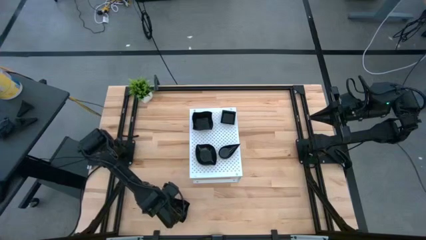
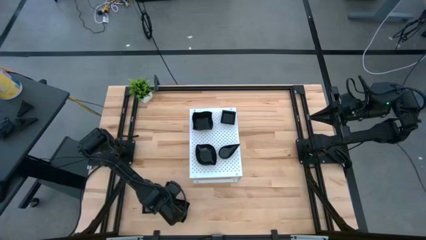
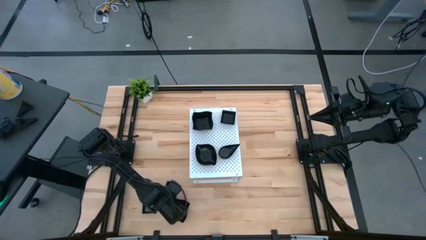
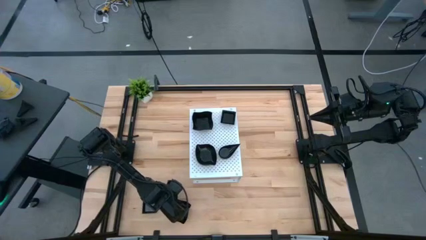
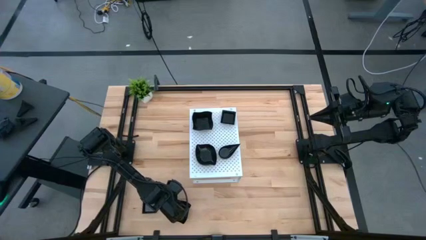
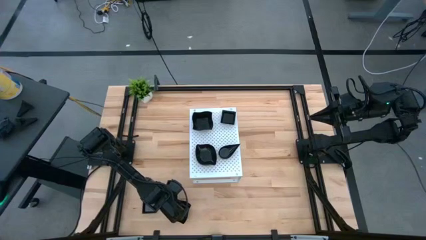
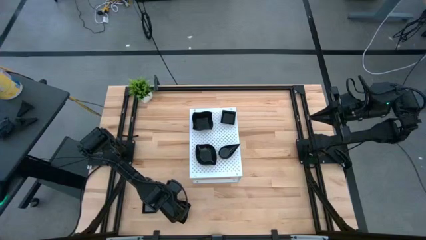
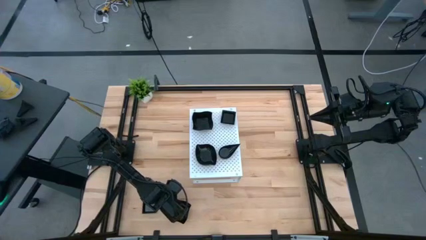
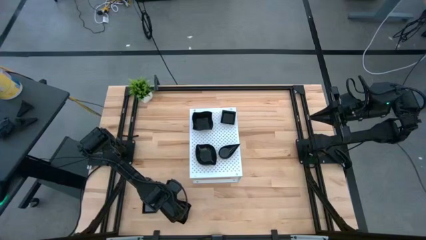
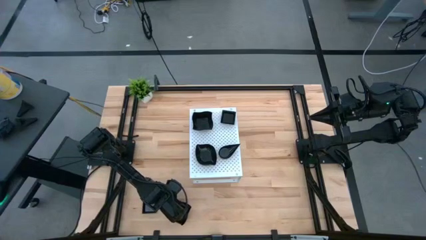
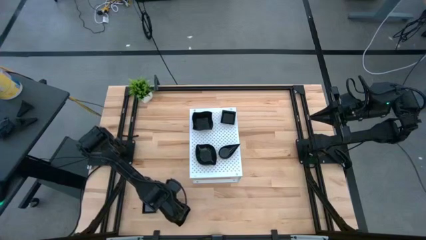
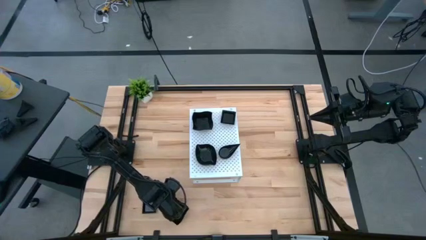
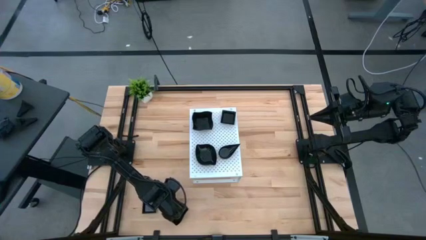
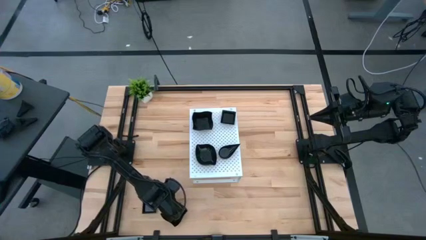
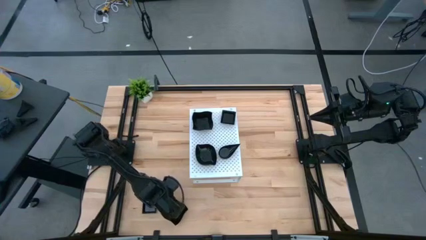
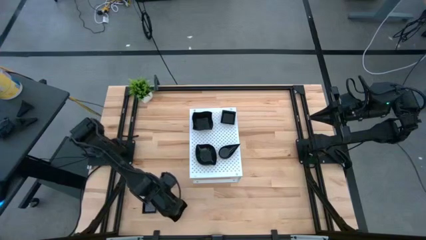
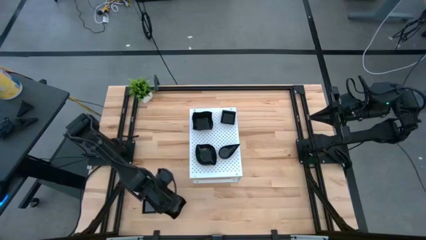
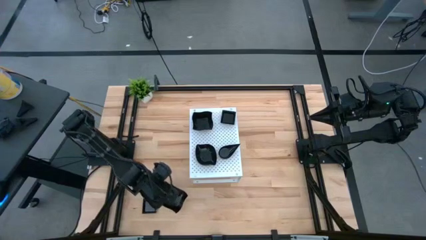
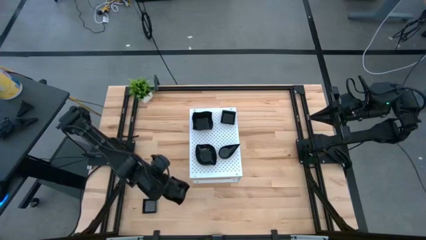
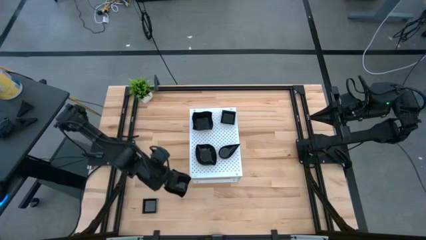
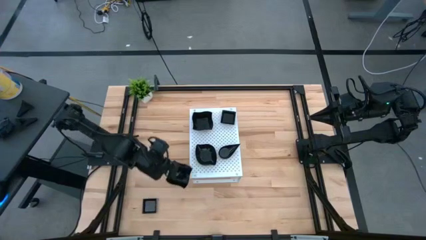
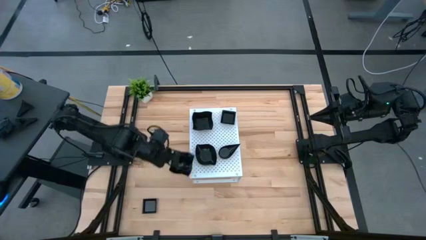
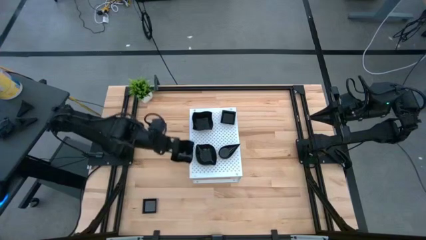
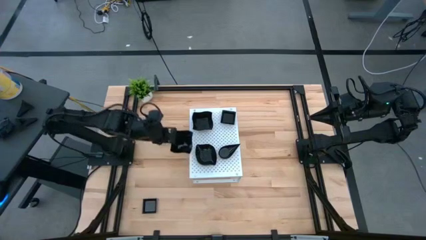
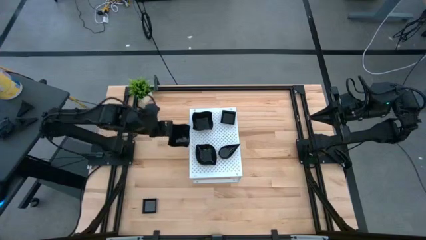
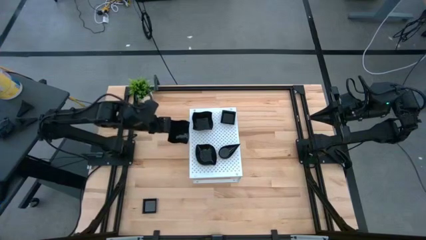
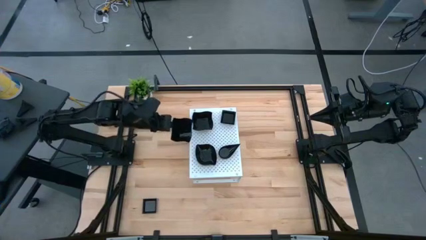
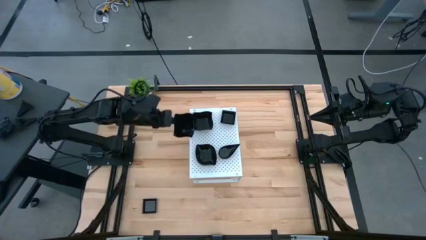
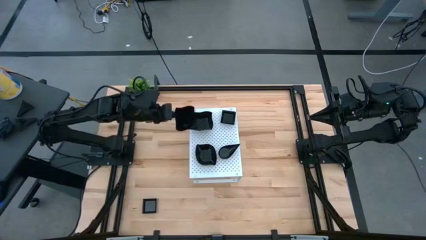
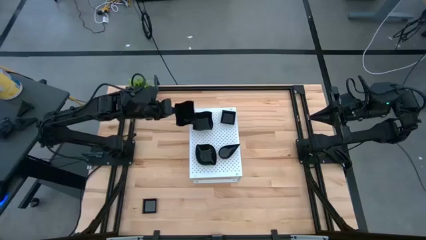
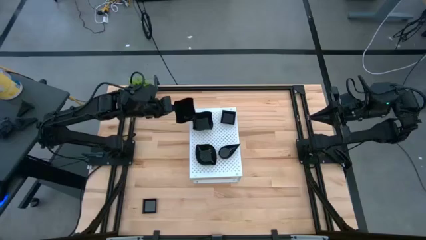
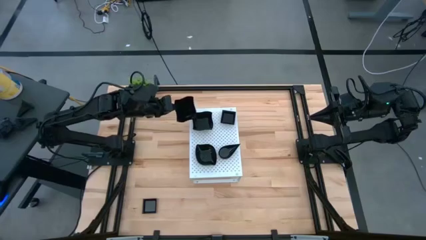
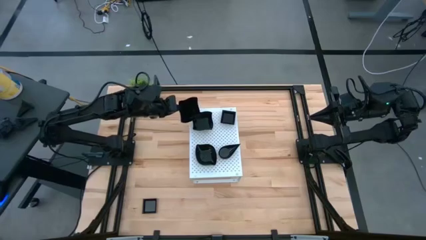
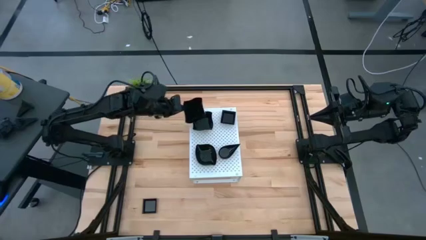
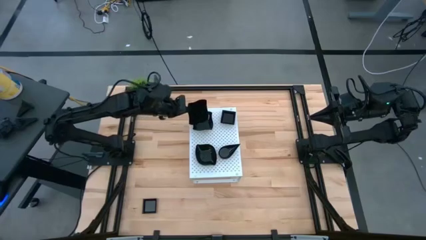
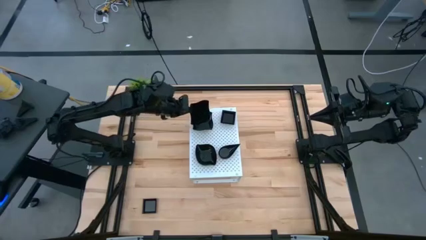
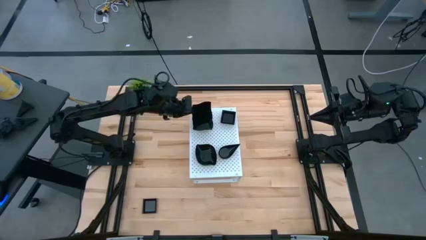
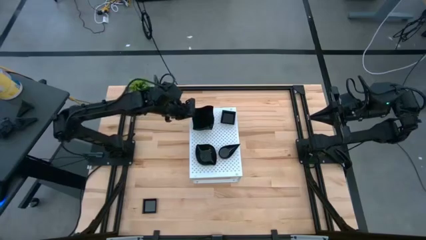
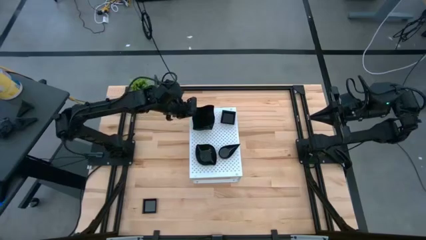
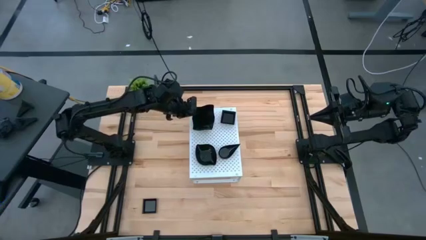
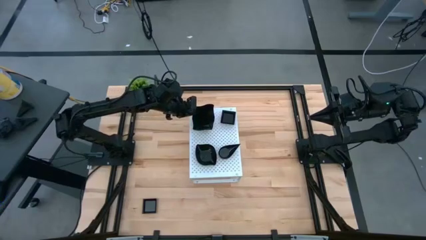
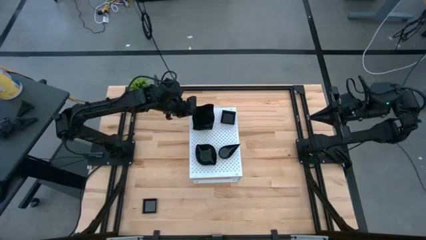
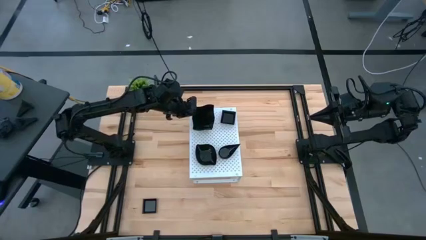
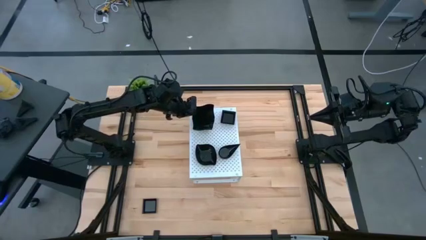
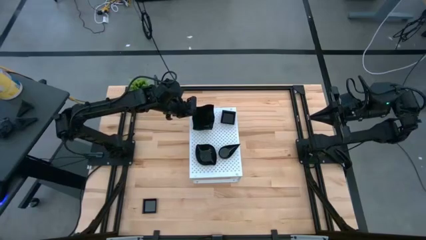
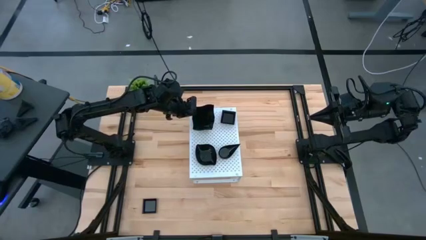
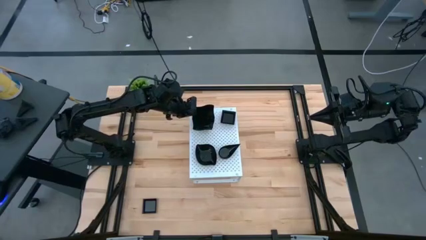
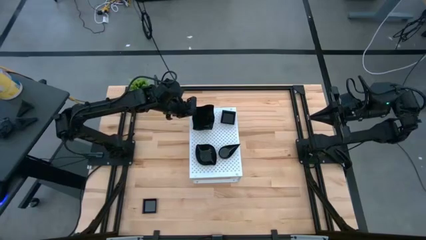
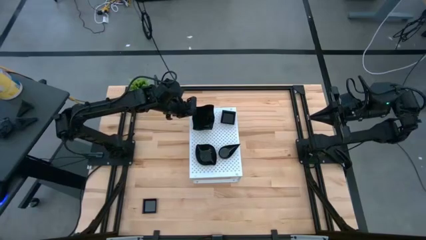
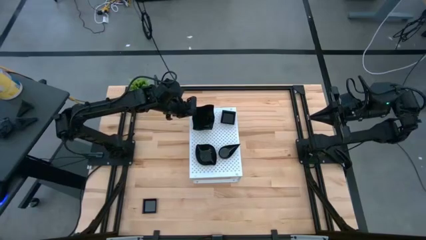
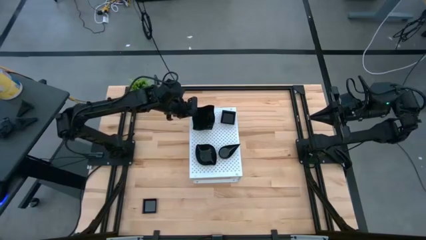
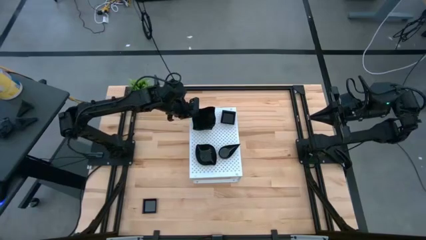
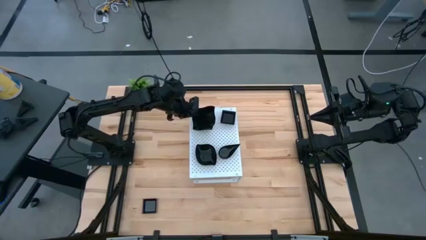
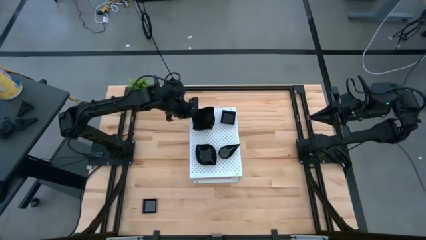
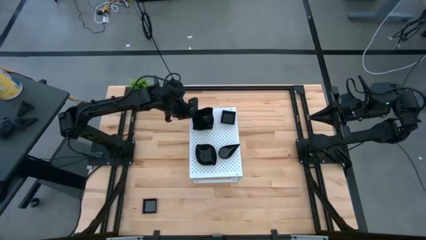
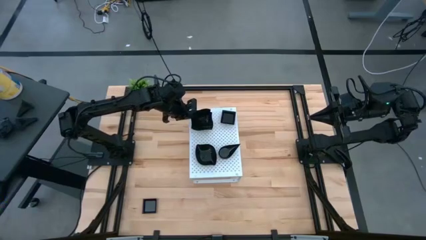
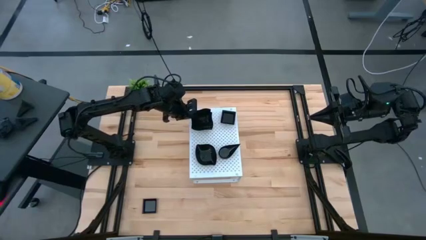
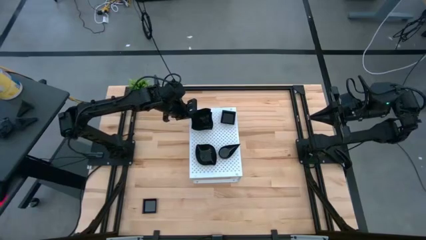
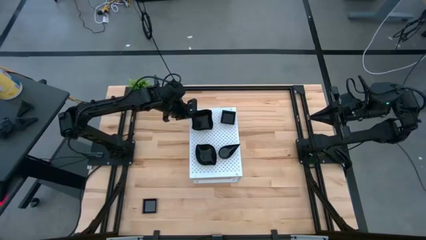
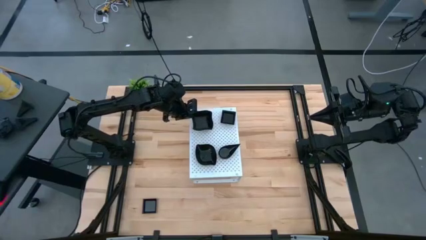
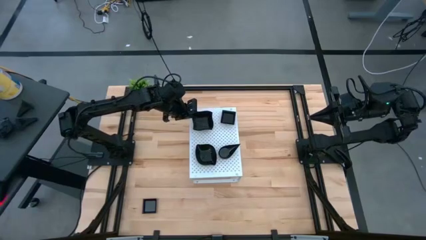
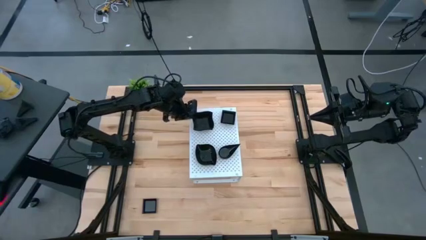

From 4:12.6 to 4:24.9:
Task: Pick & Place Mini shaped plates
Stack the black distorted square plate on top of the other black distorted square plate on the shelf
